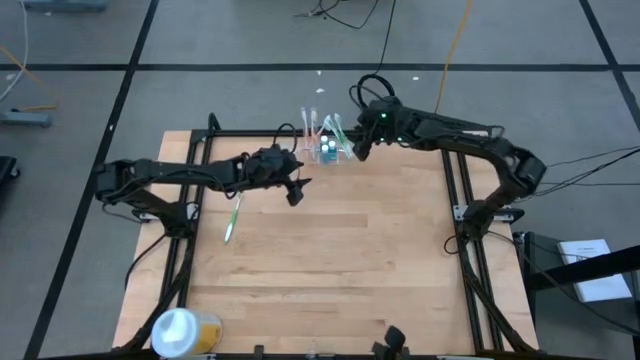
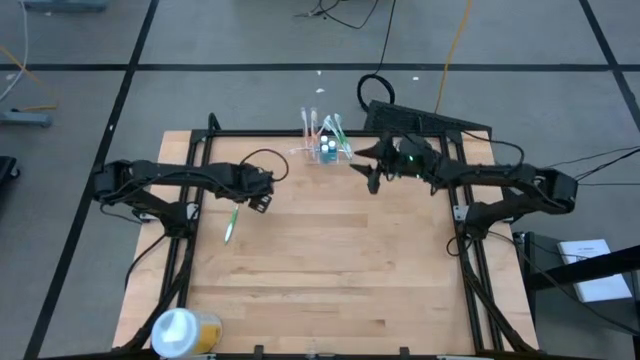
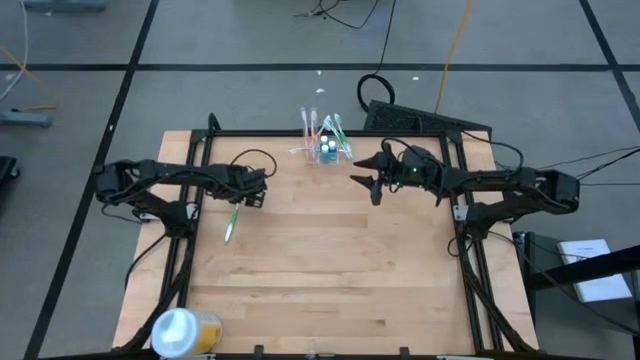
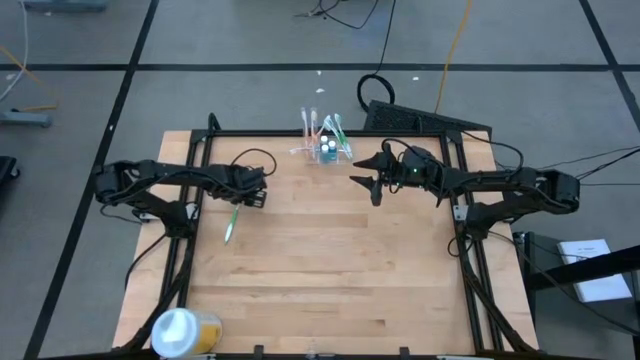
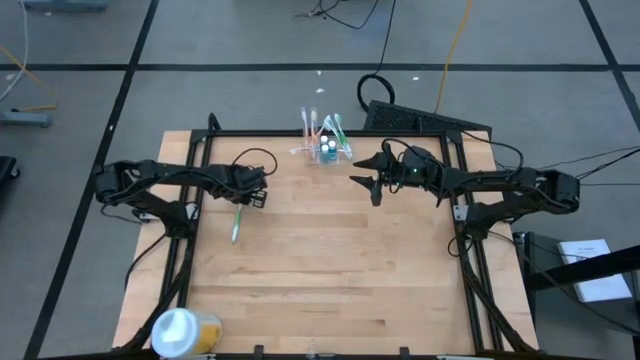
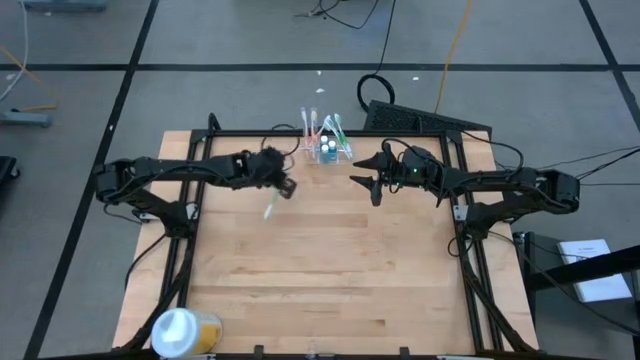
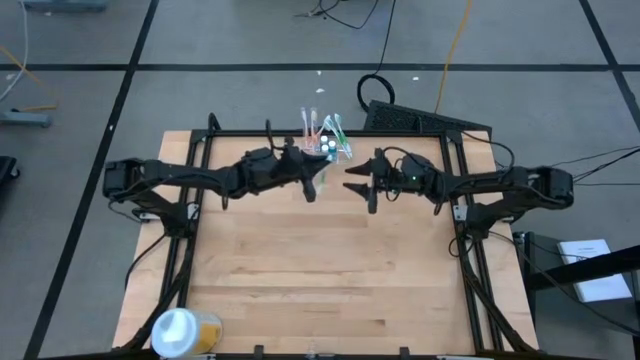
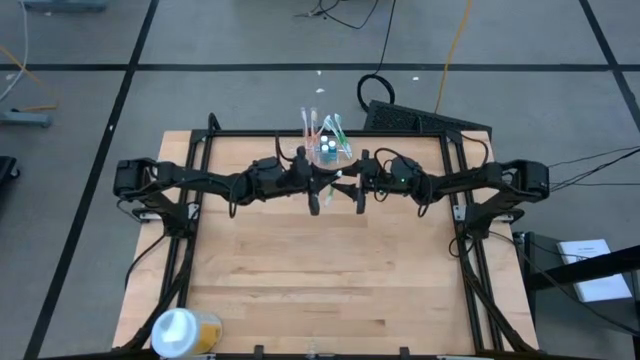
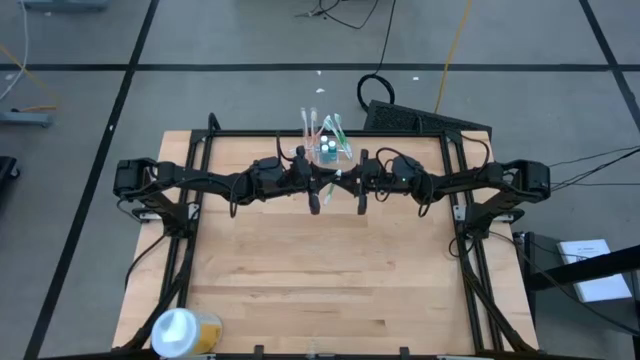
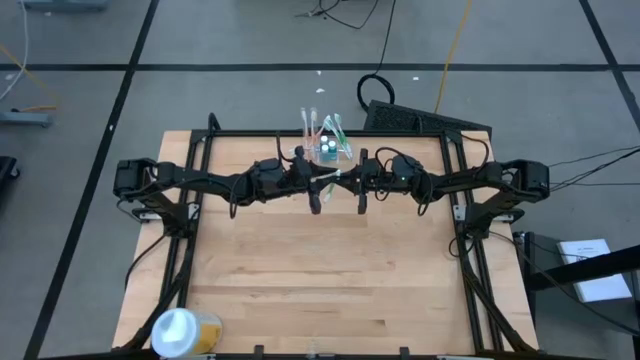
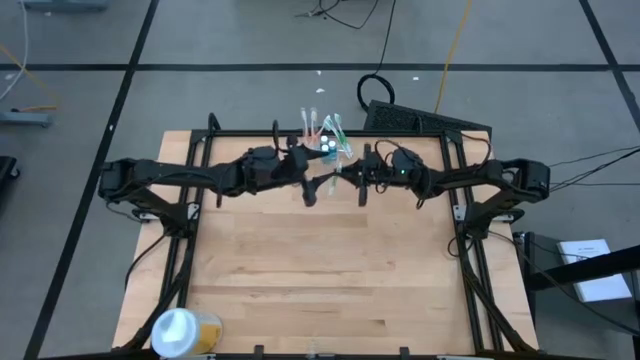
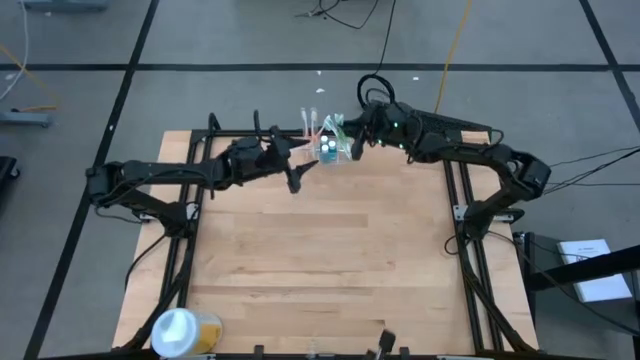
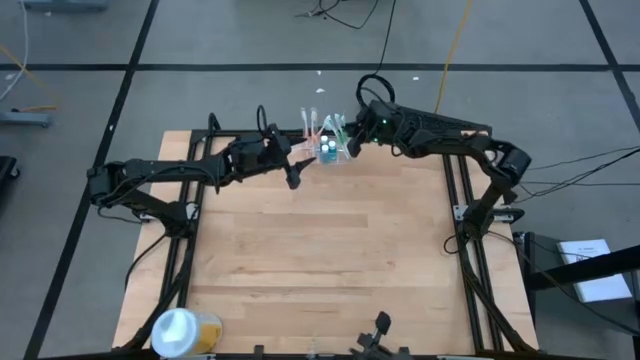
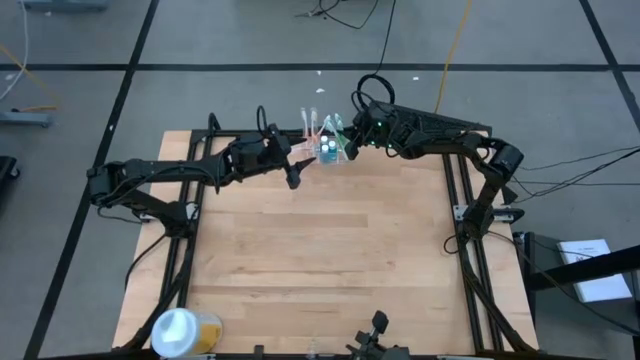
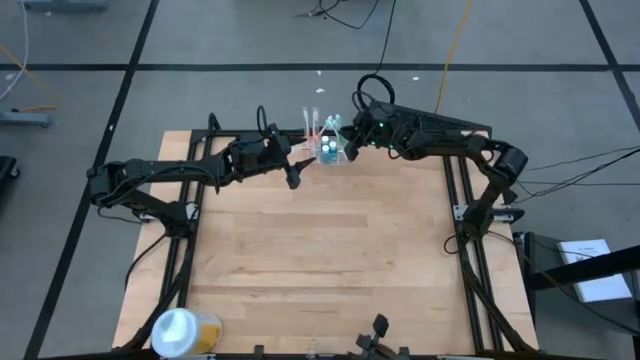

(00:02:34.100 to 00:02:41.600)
Task: Pick & Place toothbrushing station
Put the green toothbrush into the transparent organizer

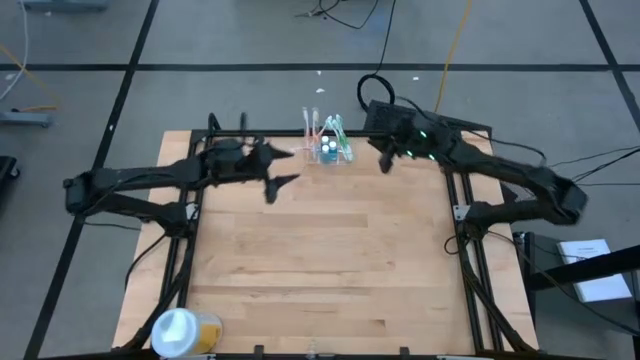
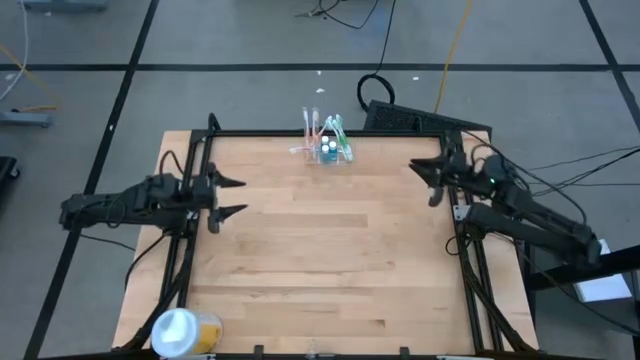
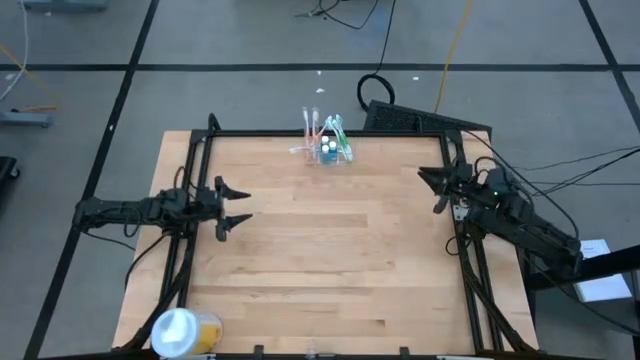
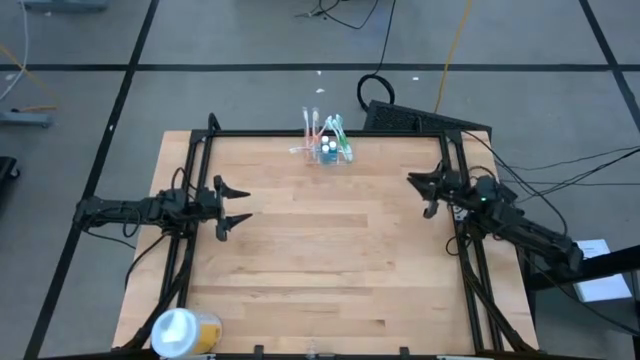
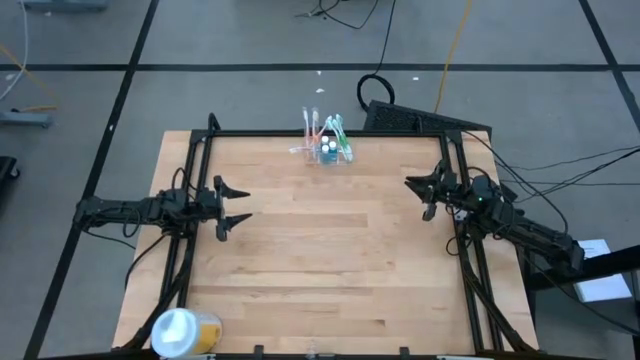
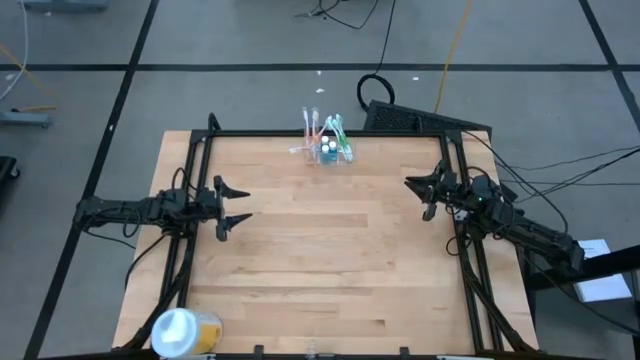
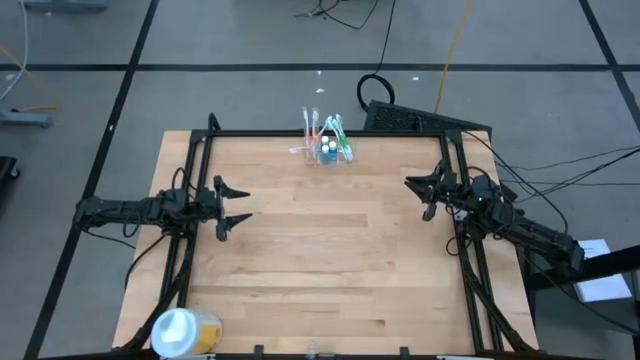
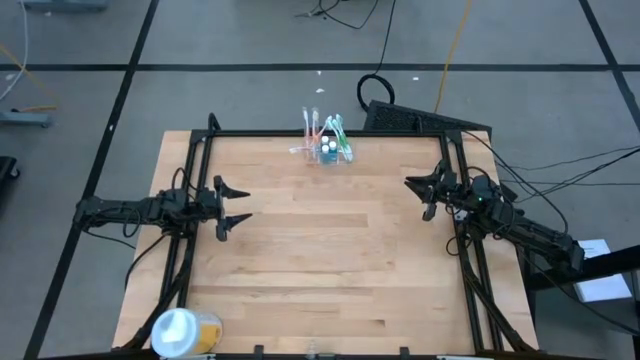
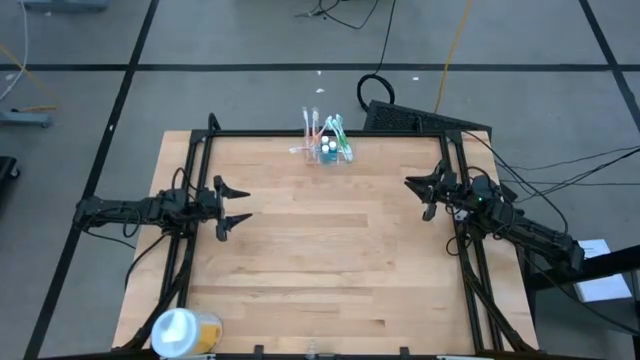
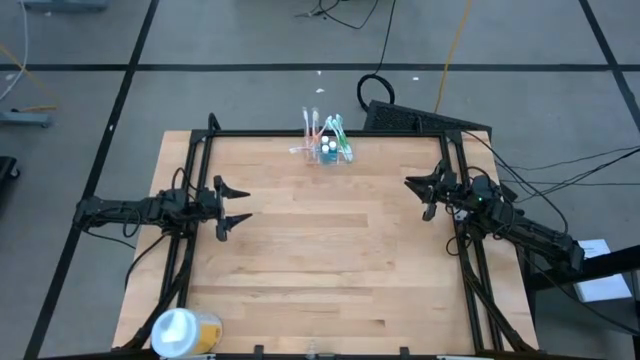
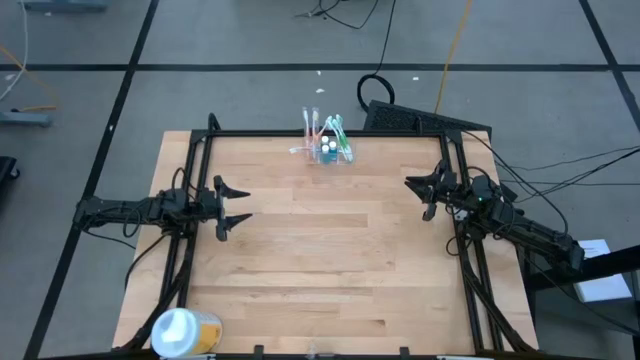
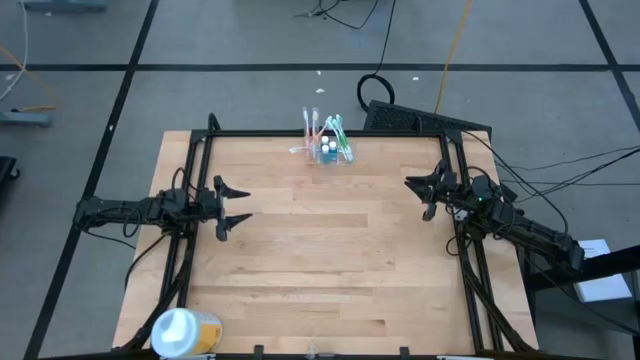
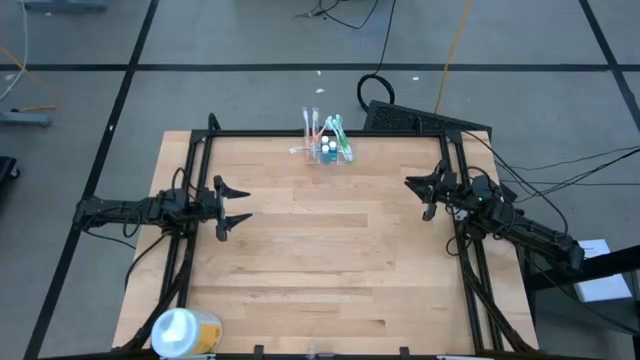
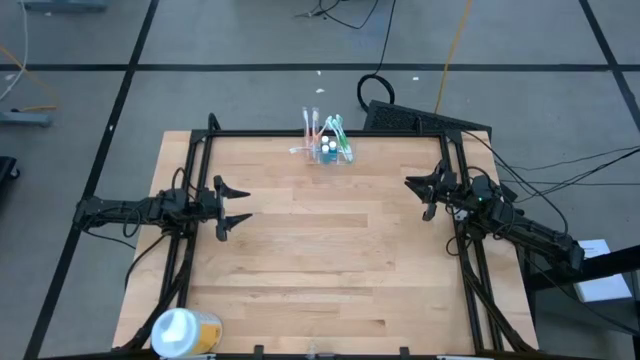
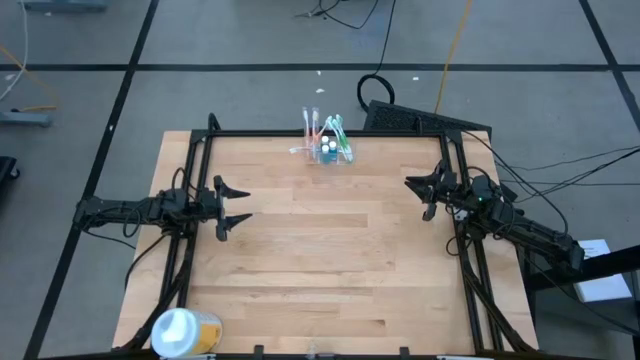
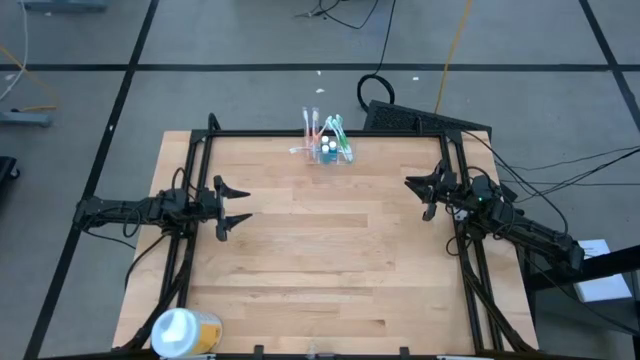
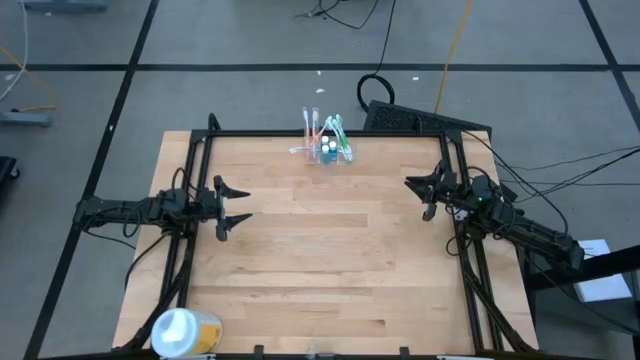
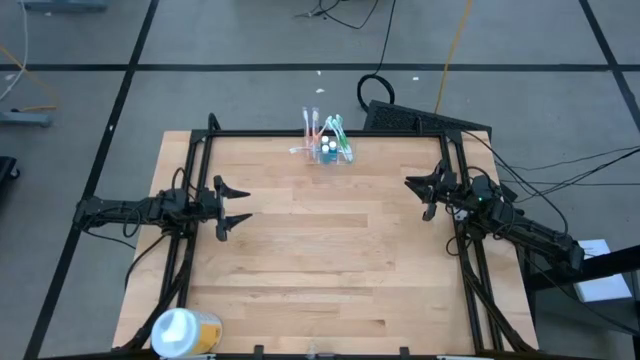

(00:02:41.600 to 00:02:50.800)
Return to Home Position

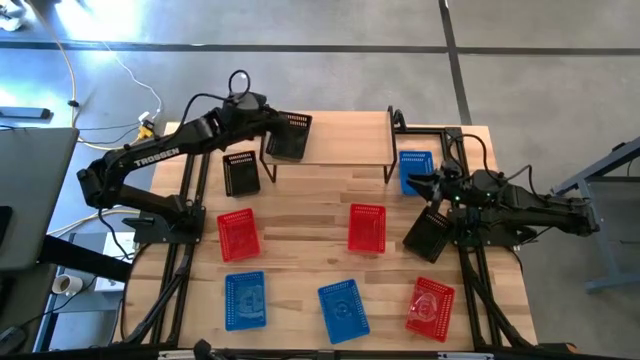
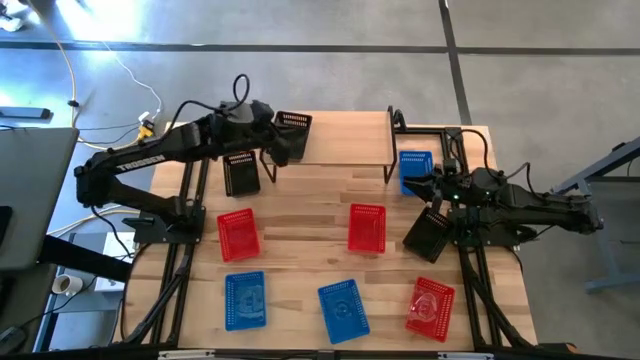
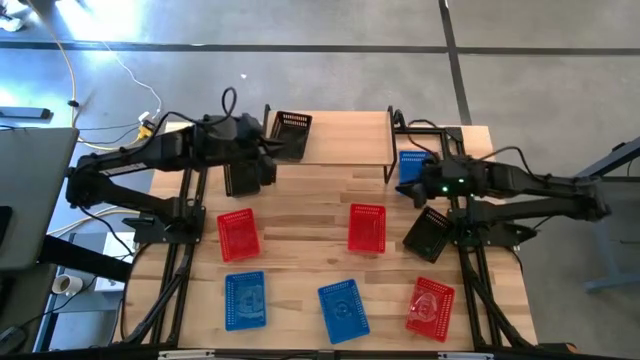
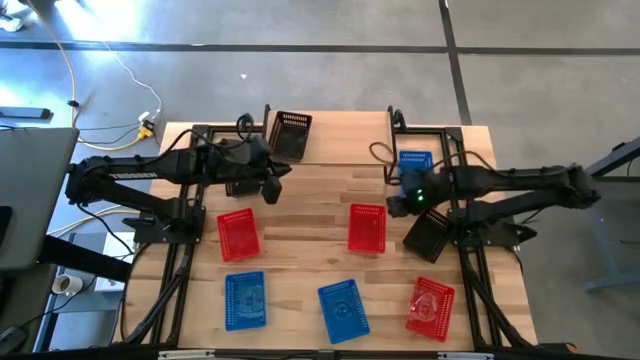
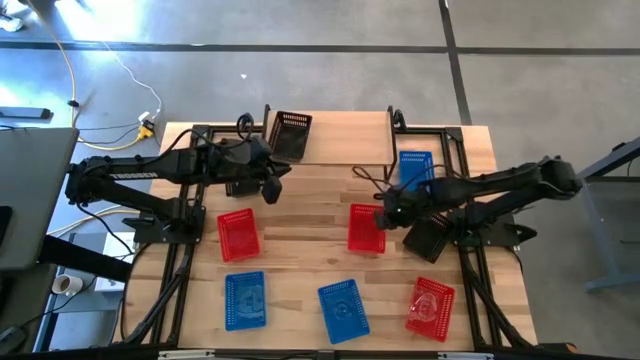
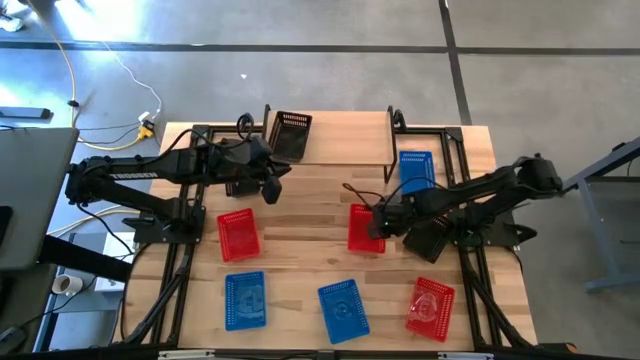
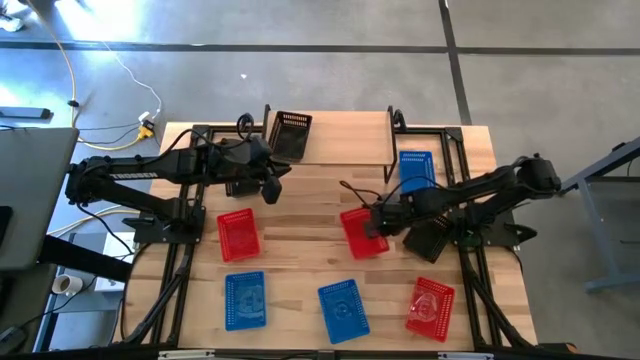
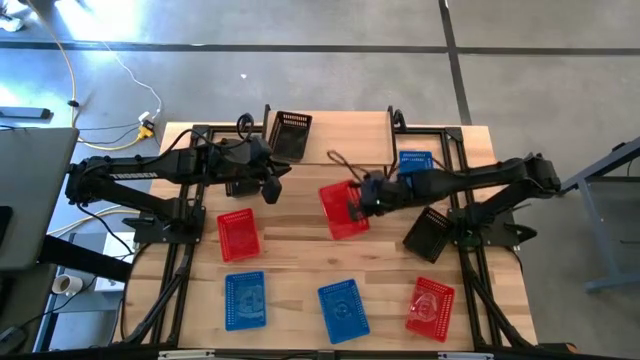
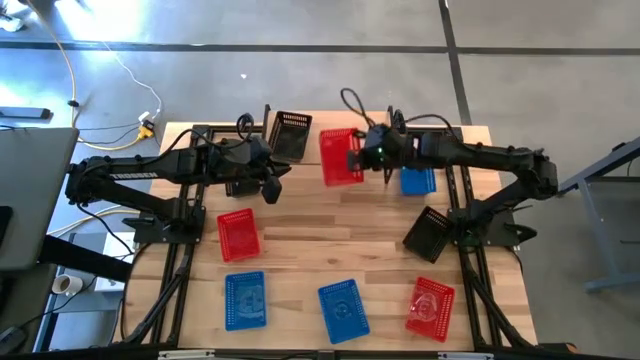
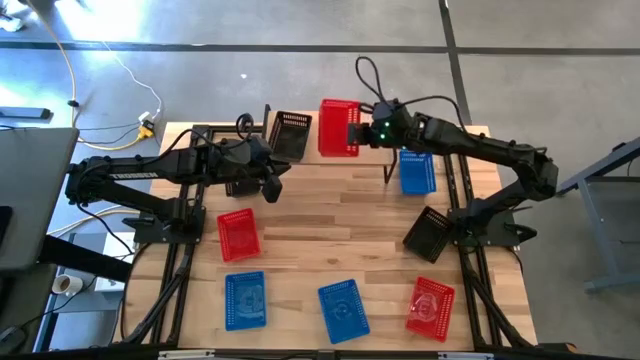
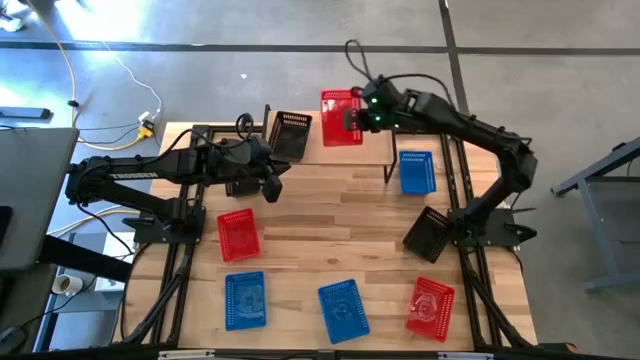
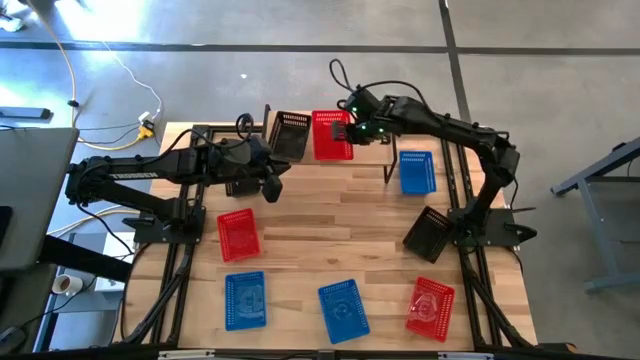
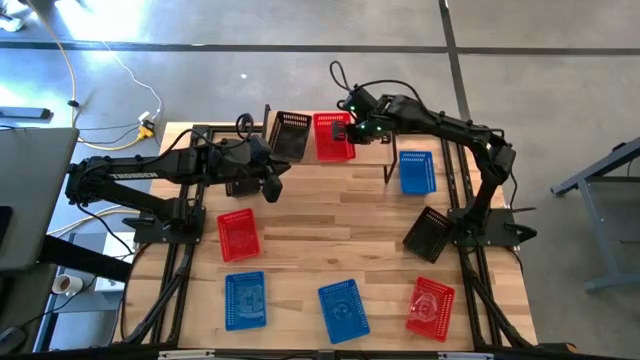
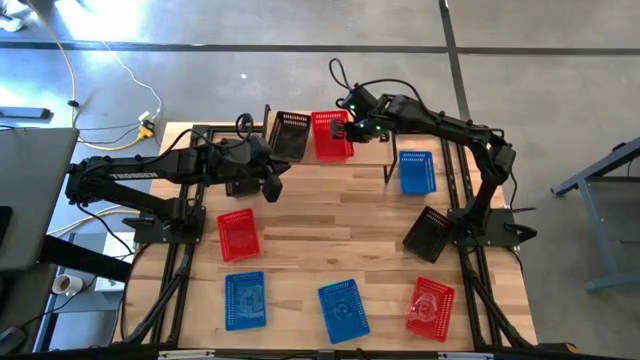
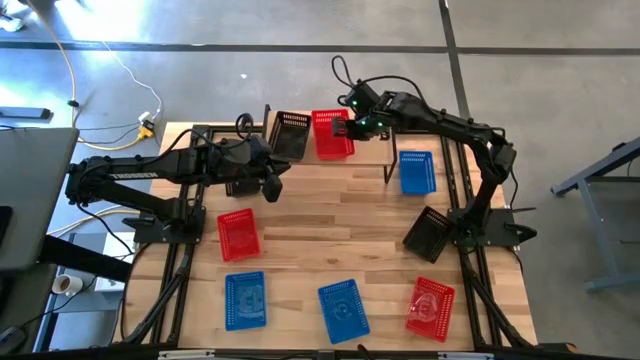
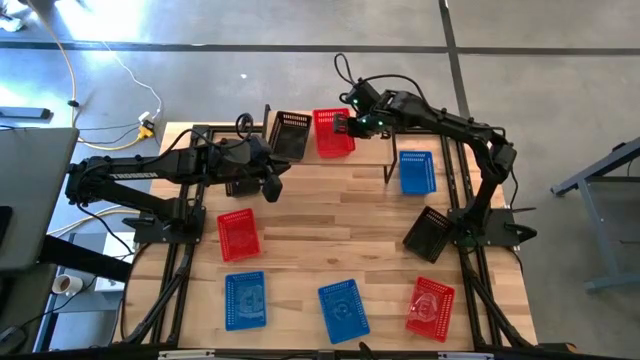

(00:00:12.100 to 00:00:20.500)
Task: Stack baskets on shelf by color
Put the top right red bin on the shelf
